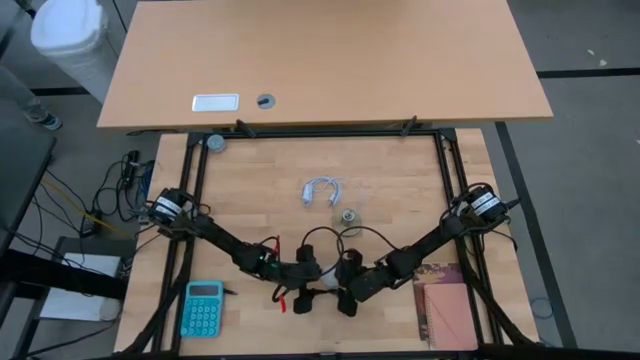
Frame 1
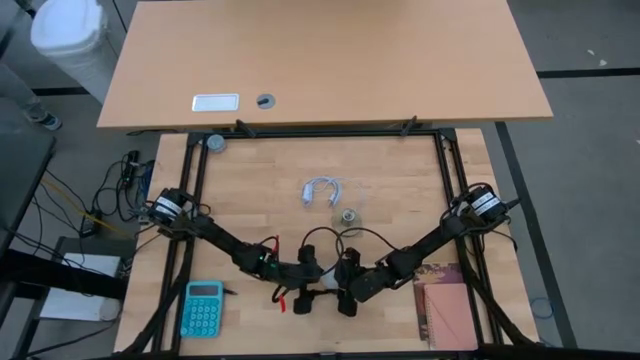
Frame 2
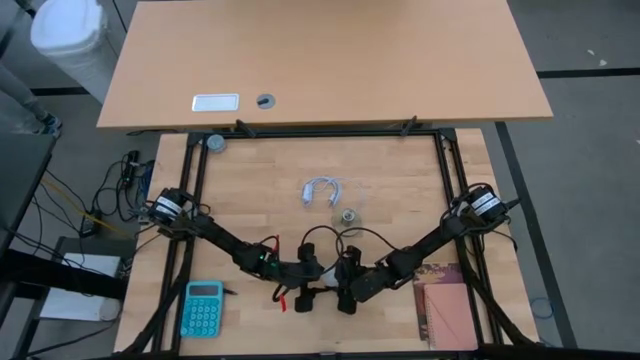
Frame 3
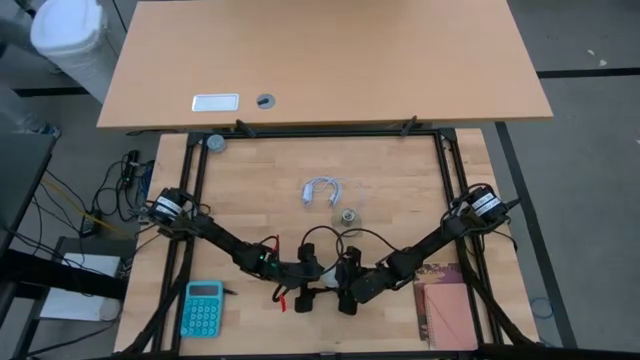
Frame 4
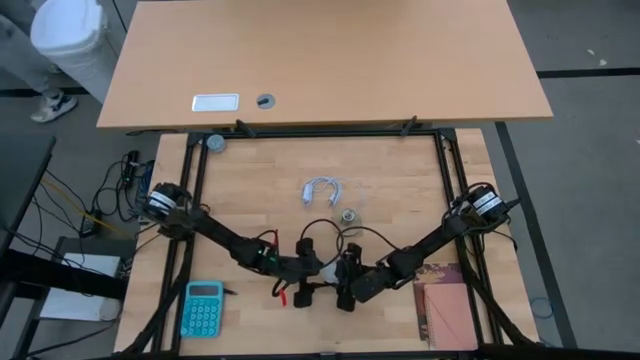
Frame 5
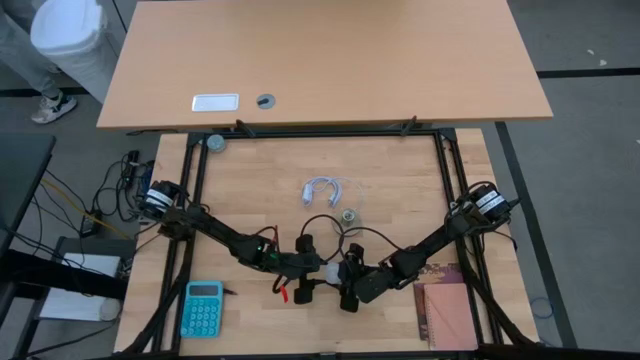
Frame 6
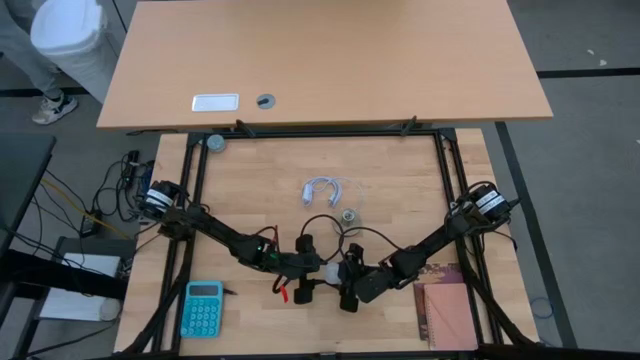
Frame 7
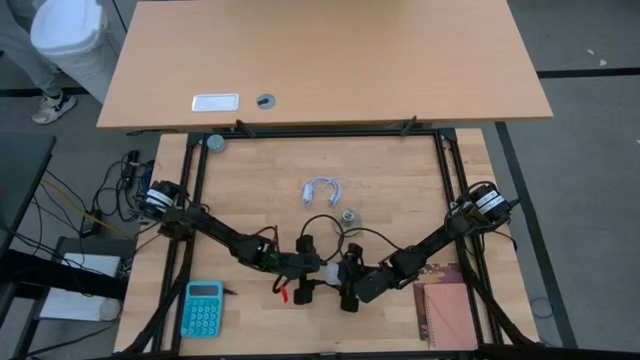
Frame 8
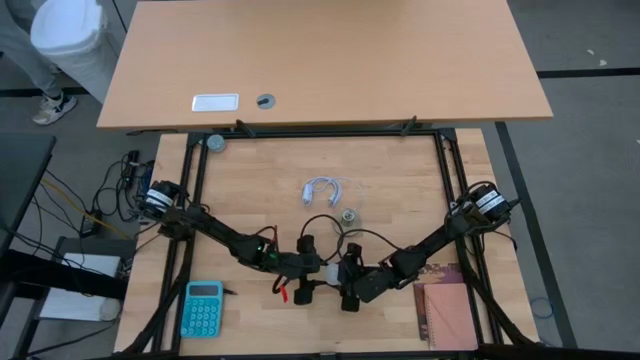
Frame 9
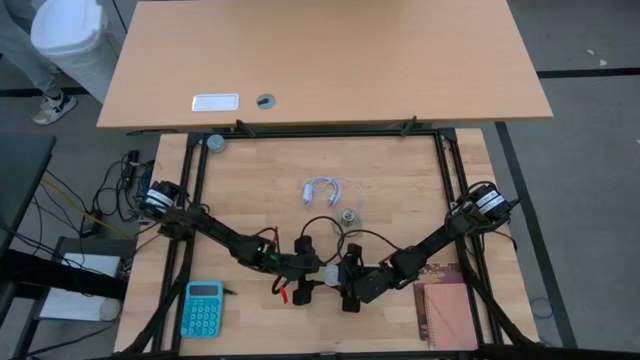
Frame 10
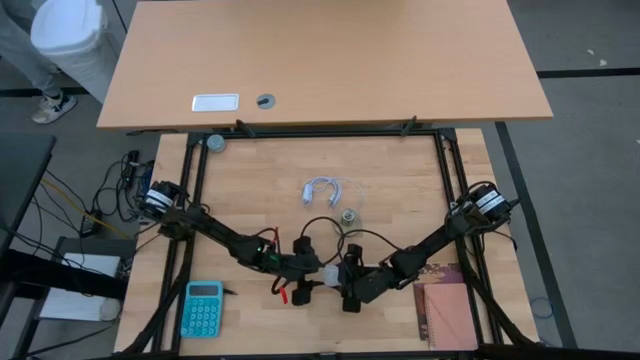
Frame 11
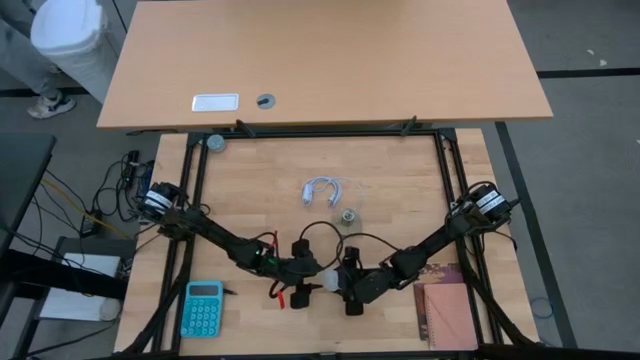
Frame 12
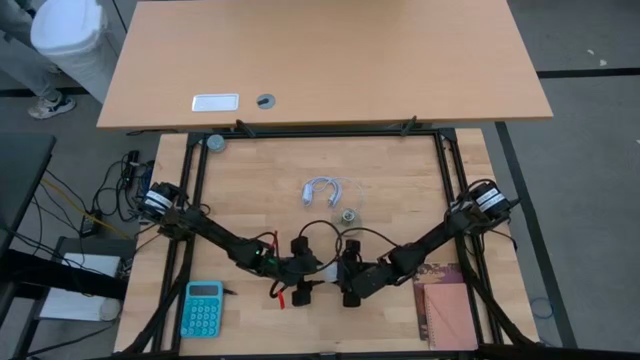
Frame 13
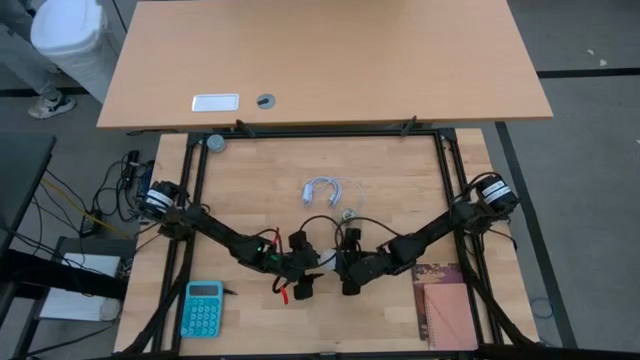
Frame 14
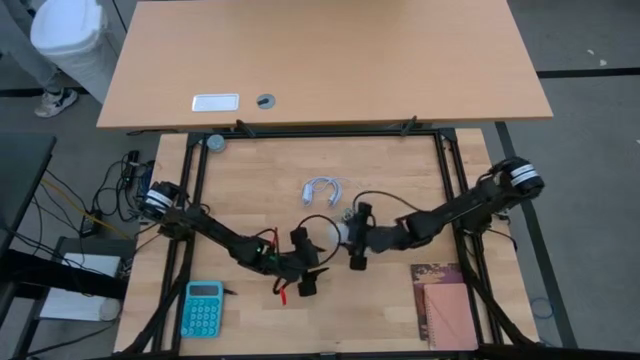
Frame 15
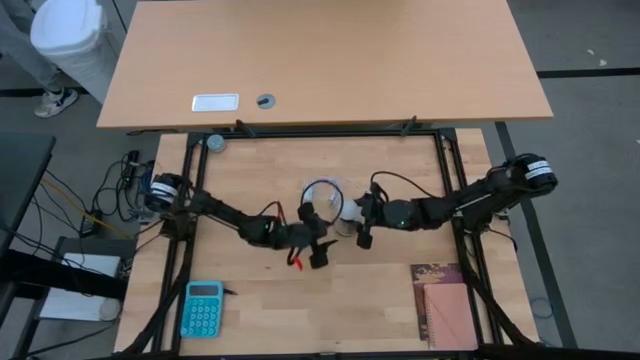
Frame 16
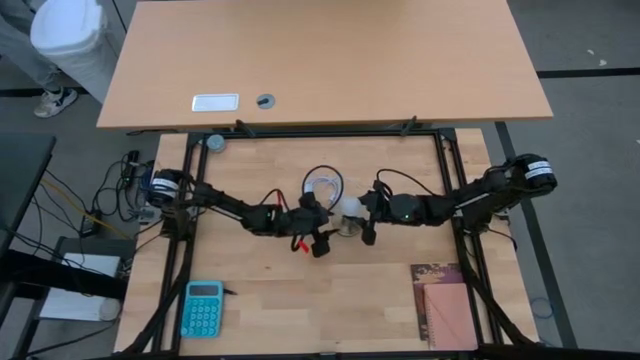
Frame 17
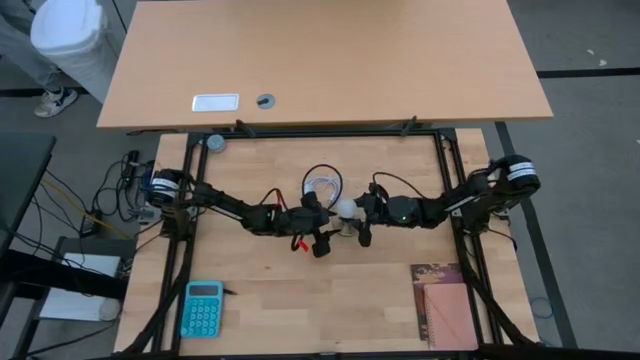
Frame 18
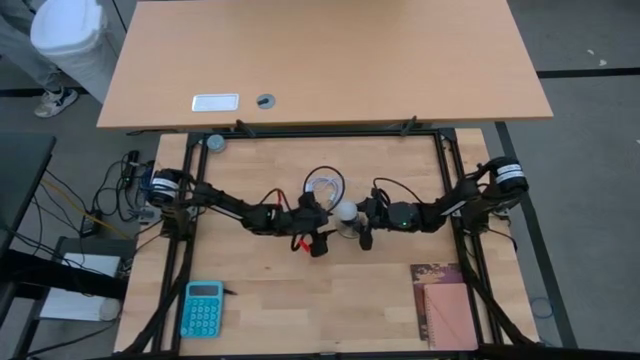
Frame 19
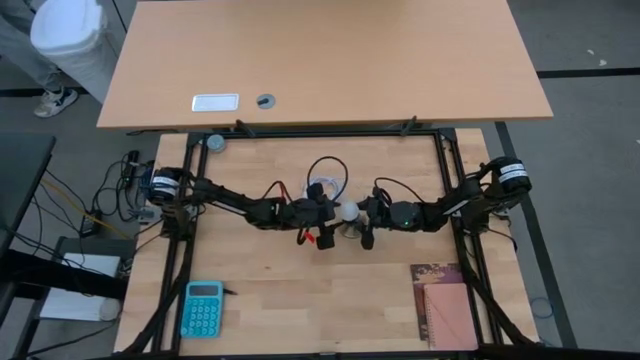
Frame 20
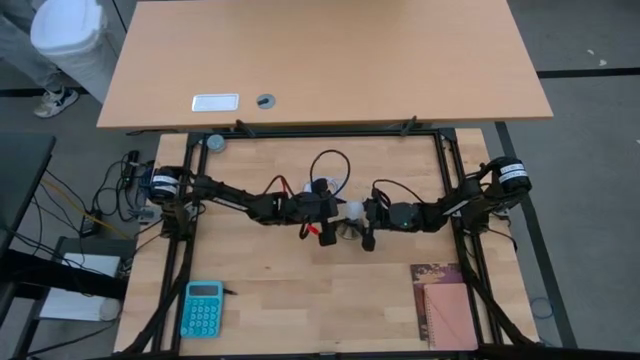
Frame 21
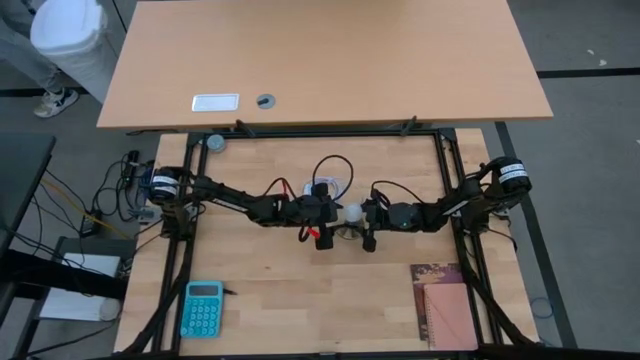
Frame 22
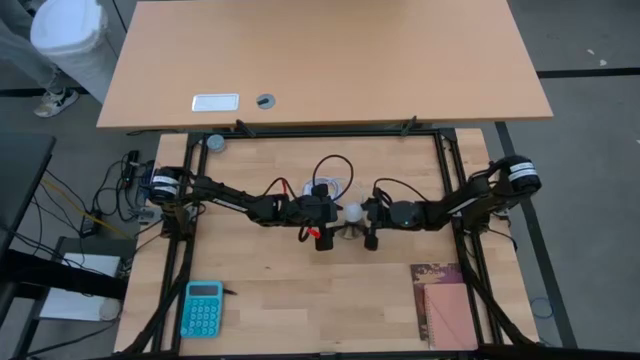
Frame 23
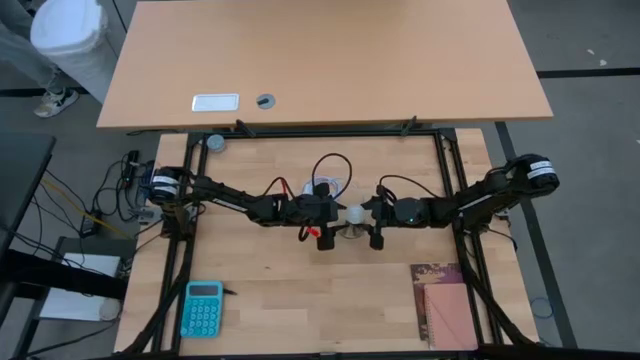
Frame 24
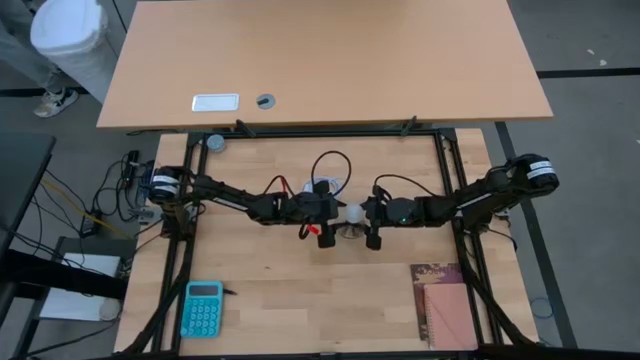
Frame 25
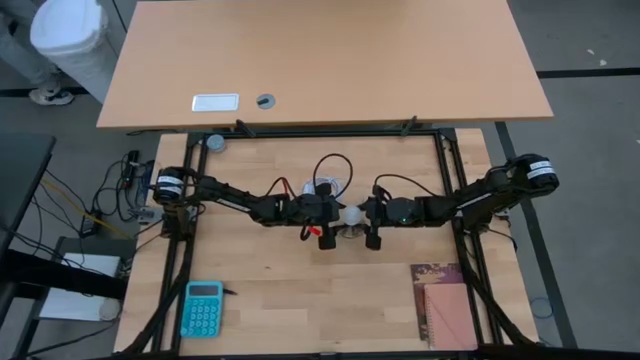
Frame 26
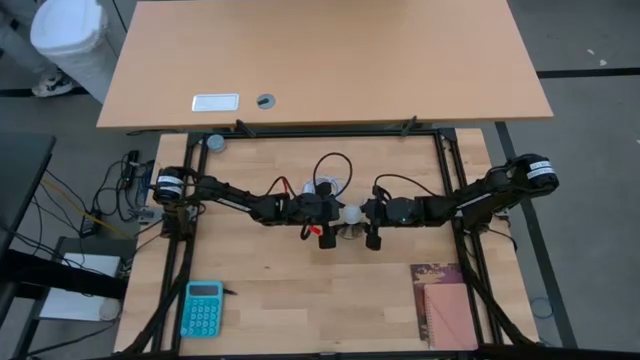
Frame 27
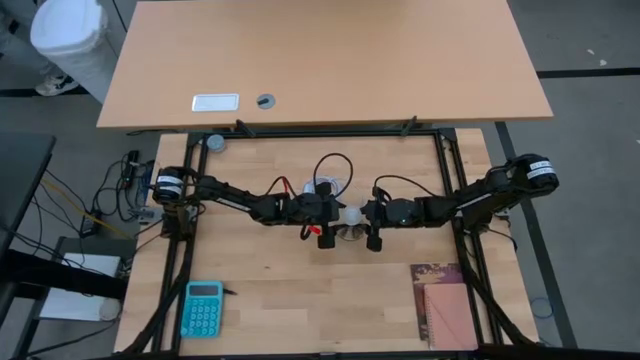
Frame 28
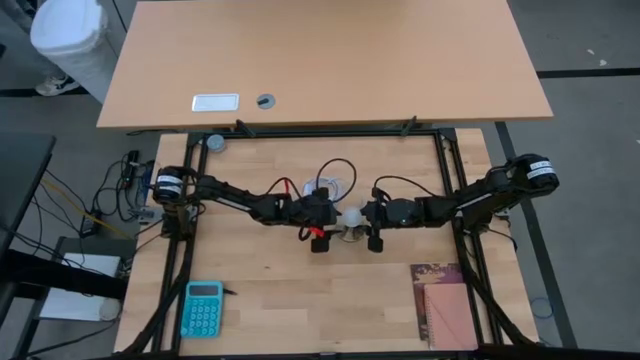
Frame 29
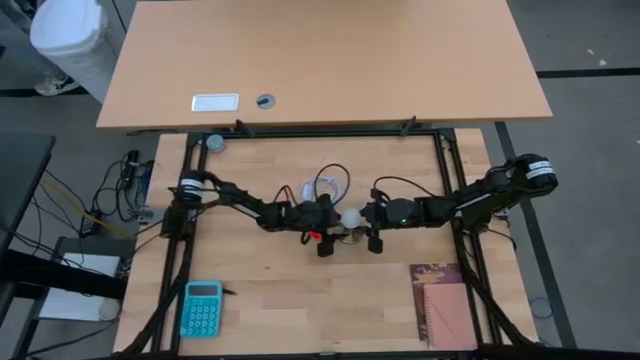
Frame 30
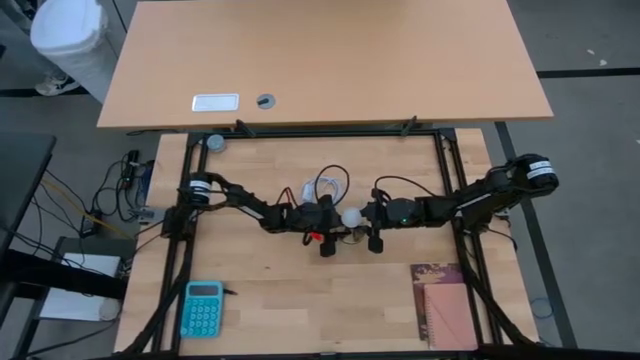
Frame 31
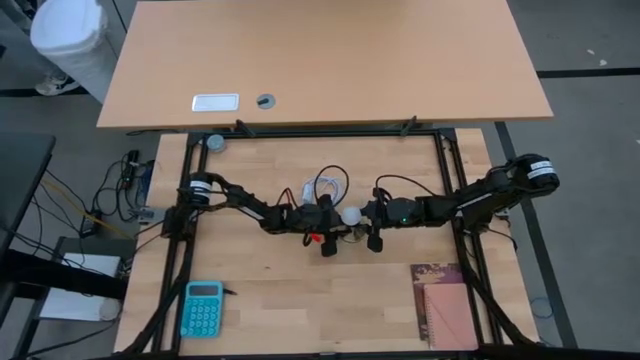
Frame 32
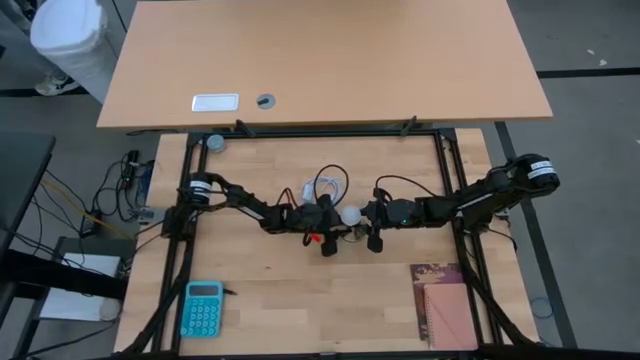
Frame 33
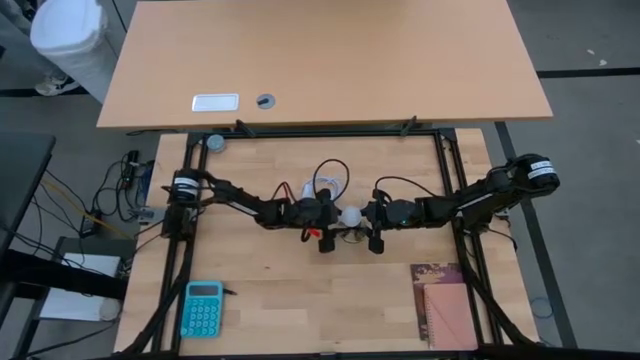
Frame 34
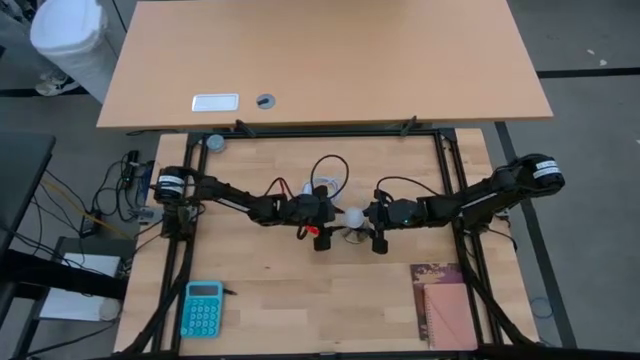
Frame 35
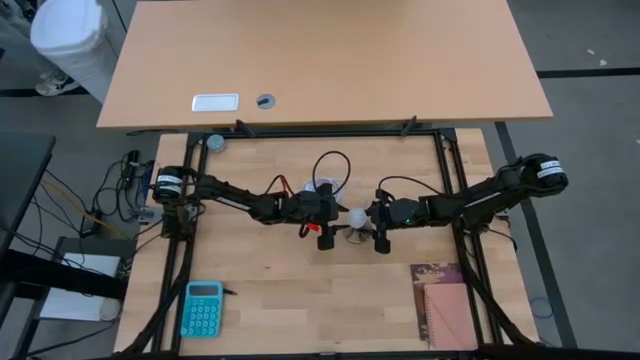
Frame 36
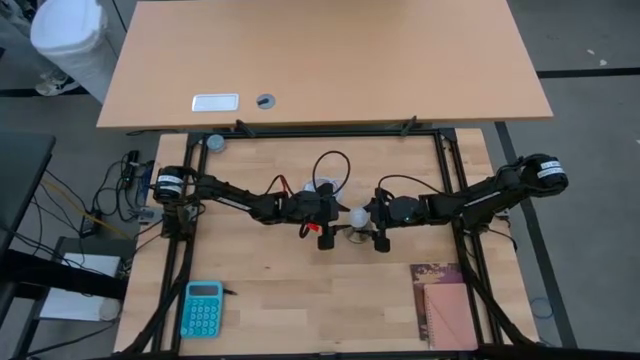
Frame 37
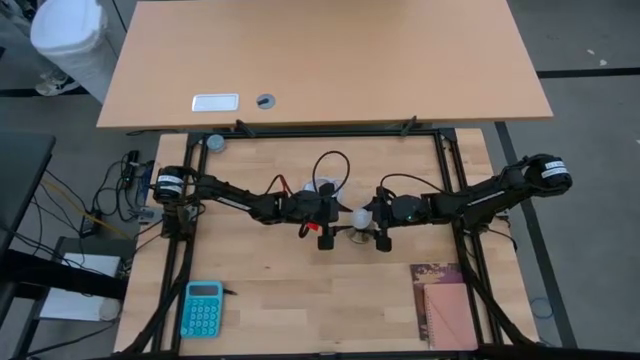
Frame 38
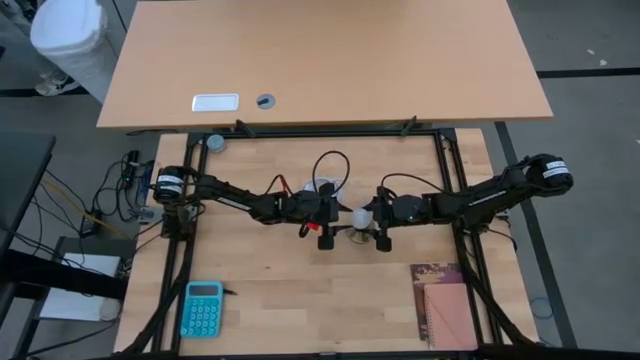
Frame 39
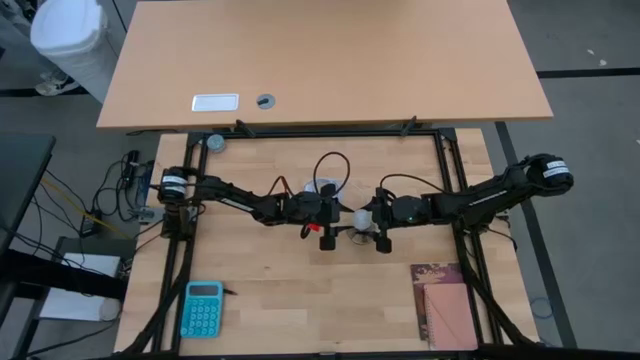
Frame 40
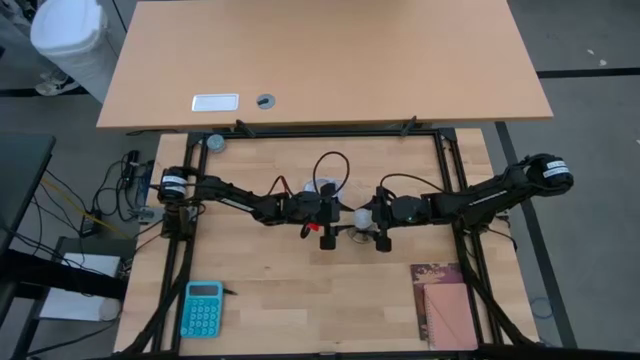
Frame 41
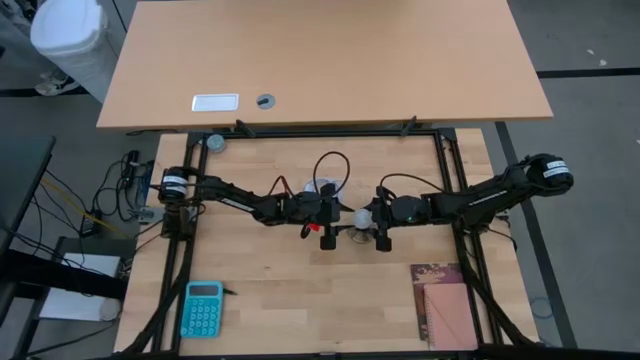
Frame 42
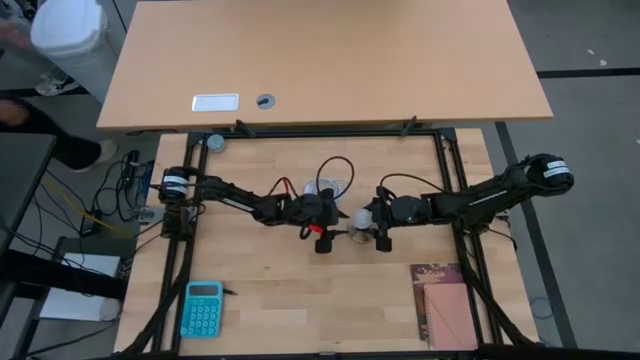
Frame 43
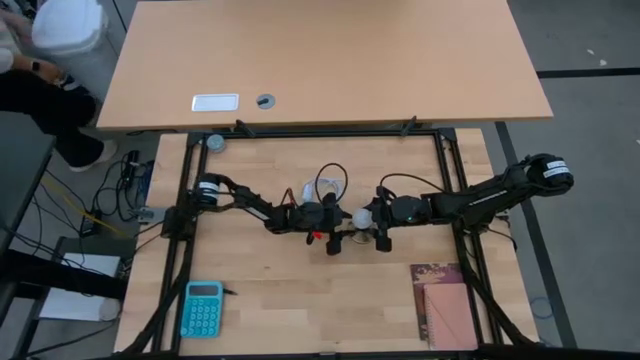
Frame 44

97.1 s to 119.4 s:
Task: Screw lightbulb
Insert the white lightbulb into the lamp socket
